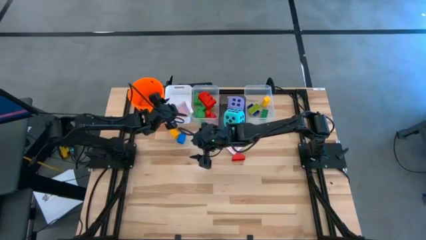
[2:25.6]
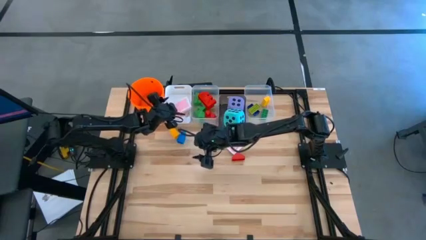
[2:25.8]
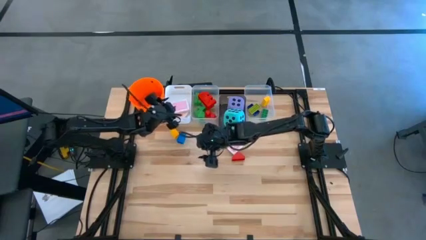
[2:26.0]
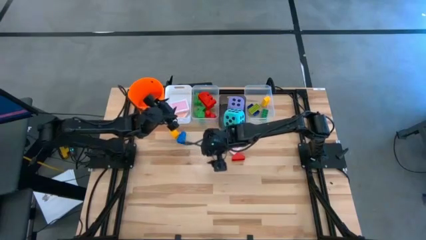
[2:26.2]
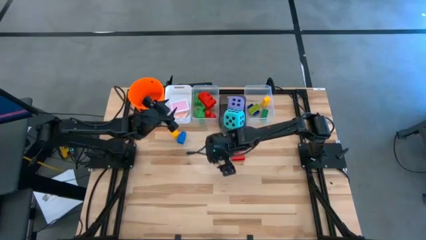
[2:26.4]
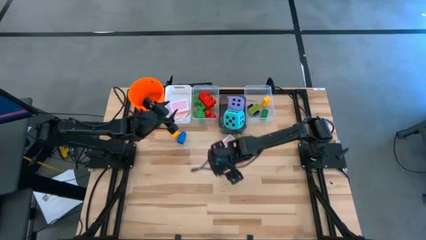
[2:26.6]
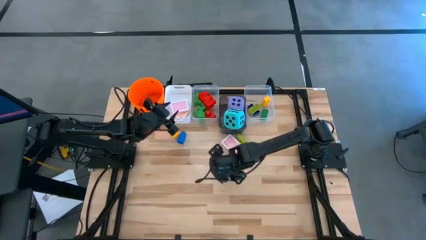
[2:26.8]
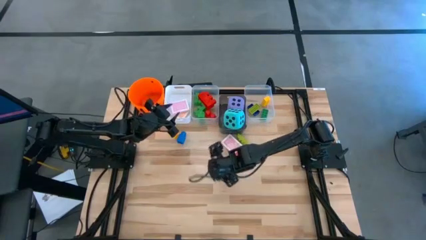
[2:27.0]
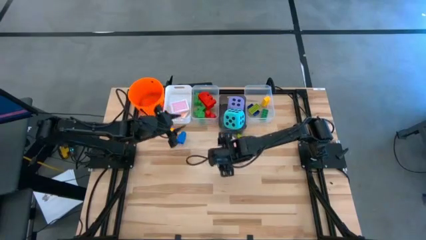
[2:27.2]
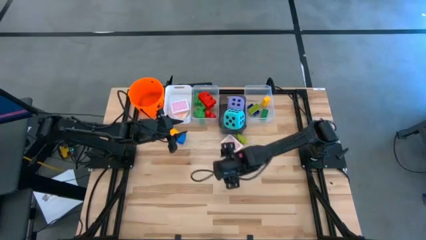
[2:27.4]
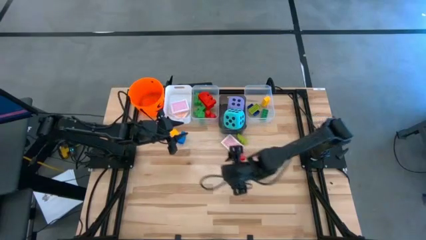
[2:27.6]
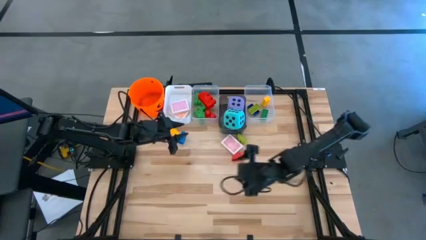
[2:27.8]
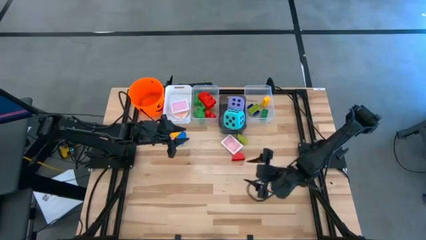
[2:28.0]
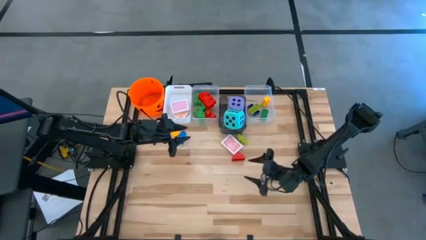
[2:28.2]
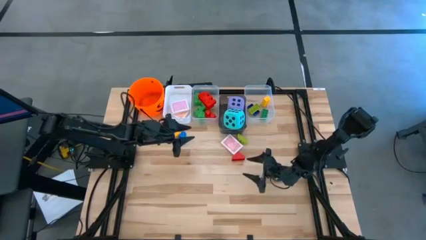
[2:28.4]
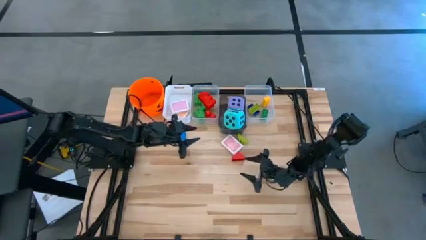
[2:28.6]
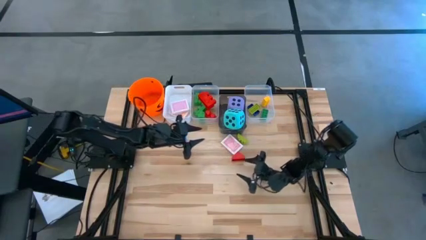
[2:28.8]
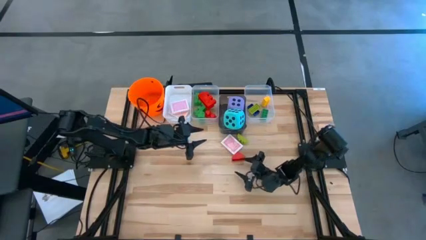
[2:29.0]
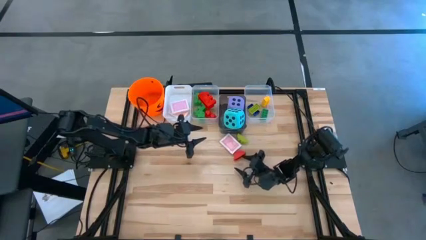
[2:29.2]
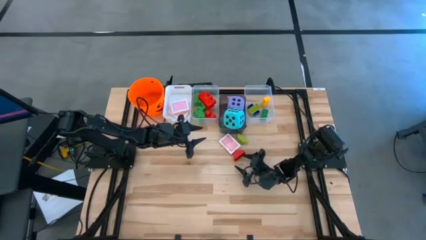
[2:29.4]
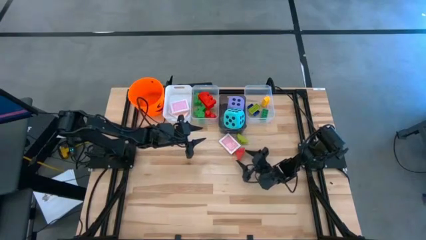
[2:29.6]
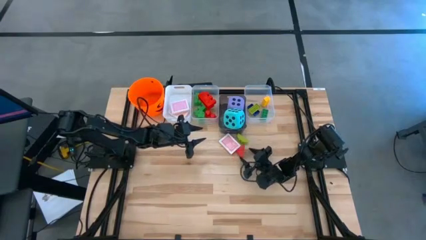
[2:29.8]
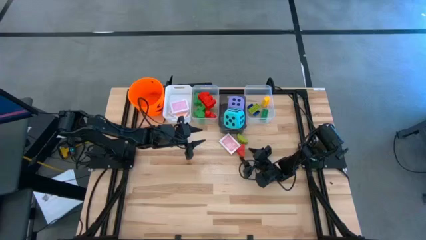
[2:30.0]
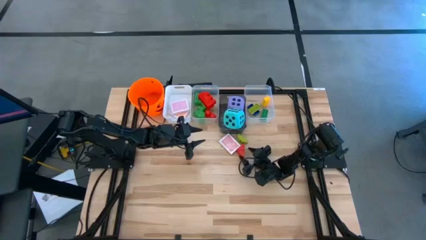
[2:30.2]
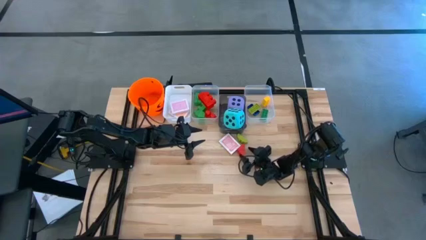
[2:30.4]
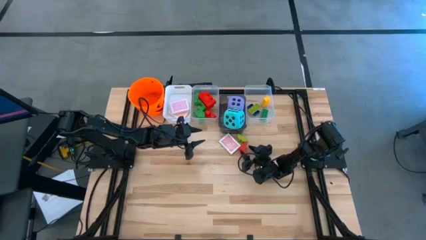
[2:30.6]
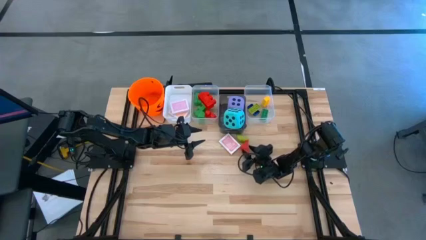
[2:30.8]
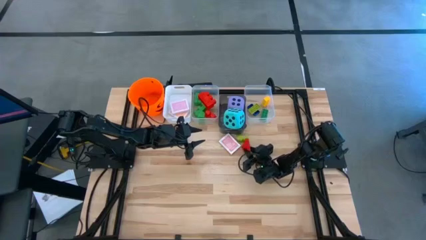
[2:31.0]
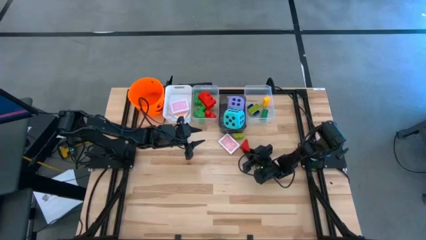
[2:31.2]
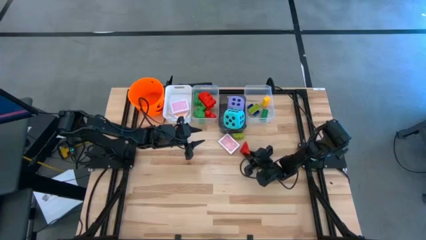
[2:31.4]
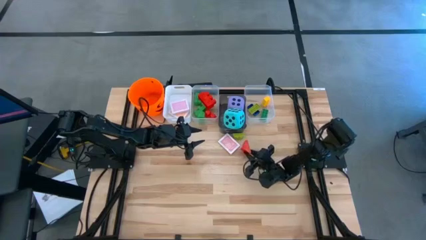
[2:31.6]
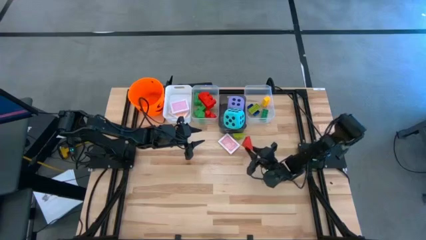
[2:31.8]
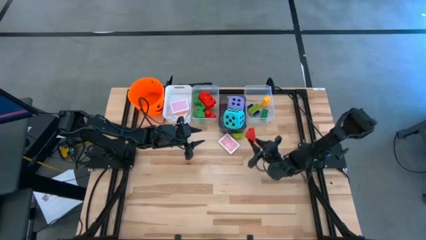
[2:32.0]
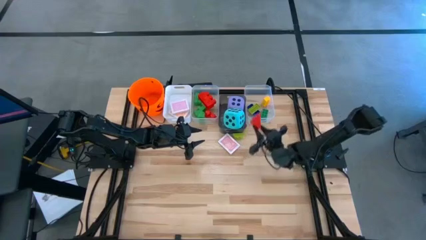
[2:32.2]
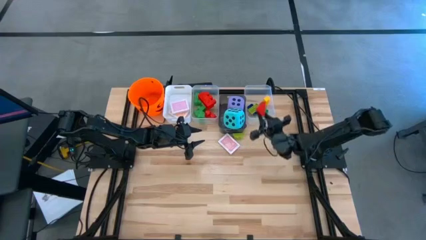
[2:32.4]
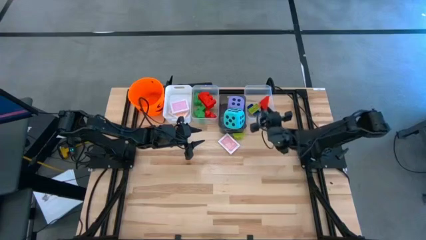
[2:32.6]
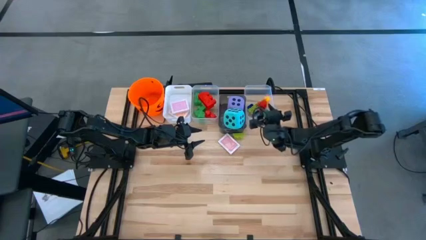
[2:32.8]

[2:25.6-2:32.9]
Task: Pick & Place Toys
Put the small red game piece into the right transparent bin

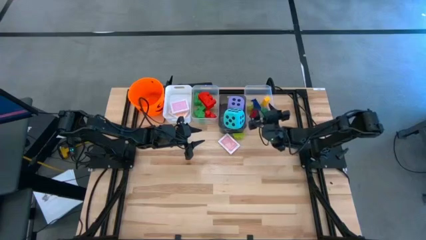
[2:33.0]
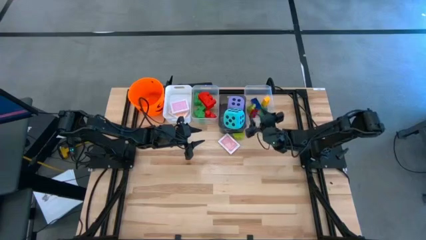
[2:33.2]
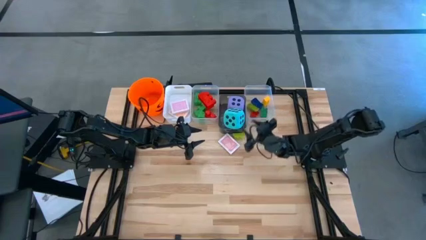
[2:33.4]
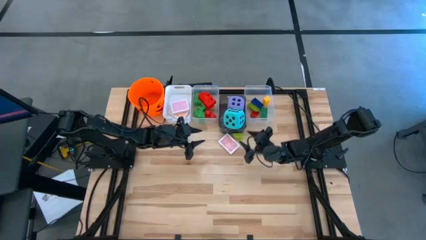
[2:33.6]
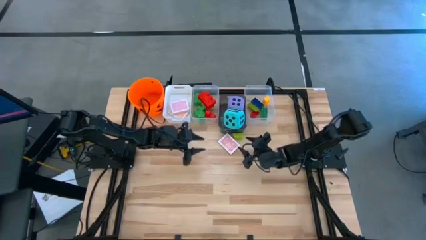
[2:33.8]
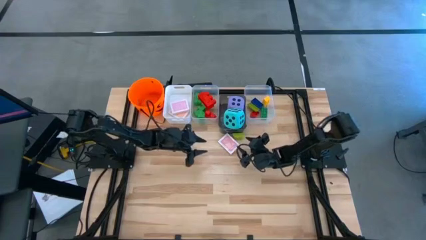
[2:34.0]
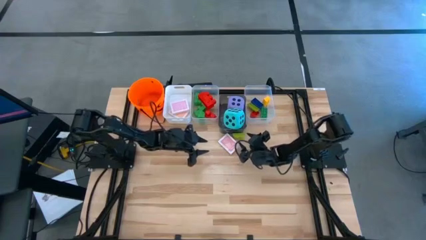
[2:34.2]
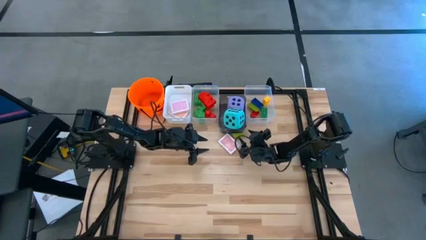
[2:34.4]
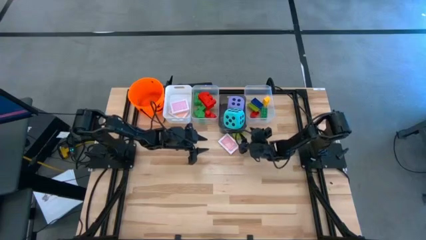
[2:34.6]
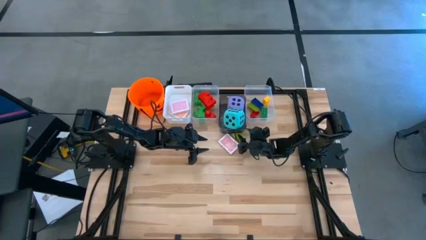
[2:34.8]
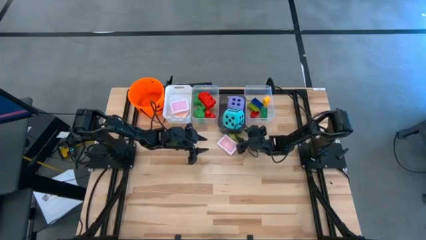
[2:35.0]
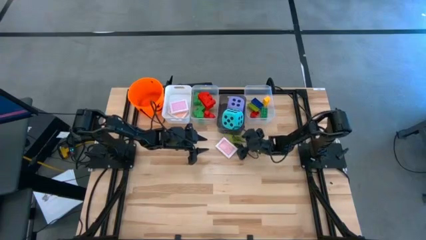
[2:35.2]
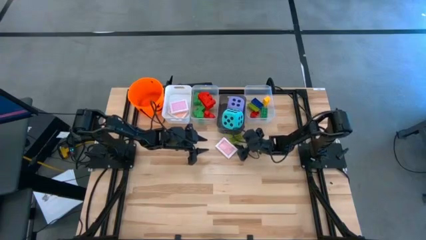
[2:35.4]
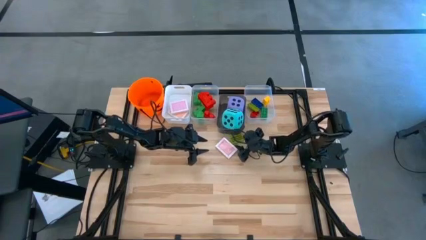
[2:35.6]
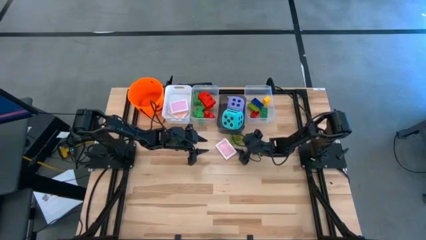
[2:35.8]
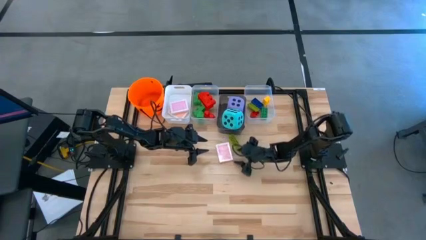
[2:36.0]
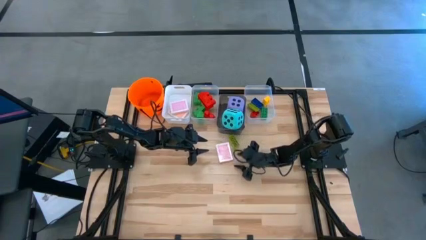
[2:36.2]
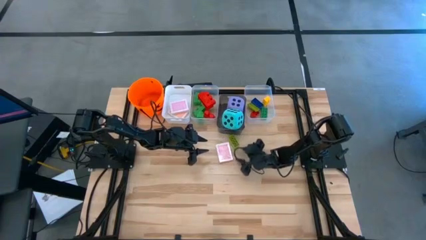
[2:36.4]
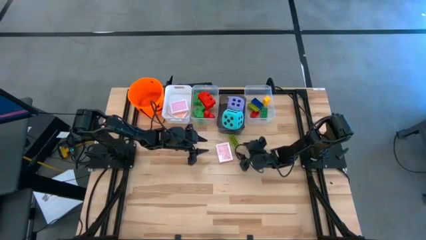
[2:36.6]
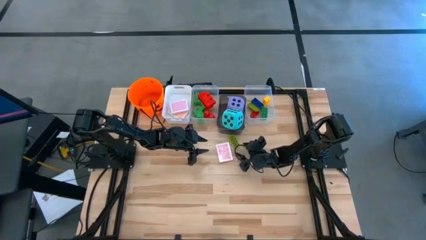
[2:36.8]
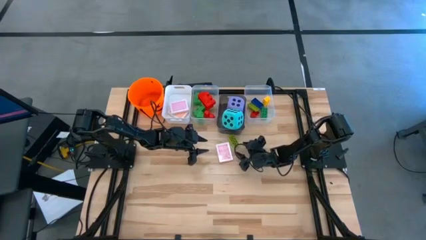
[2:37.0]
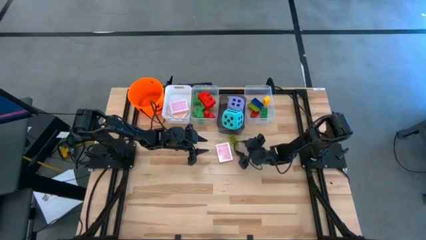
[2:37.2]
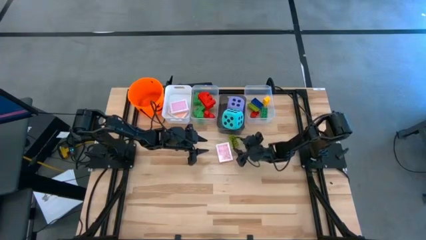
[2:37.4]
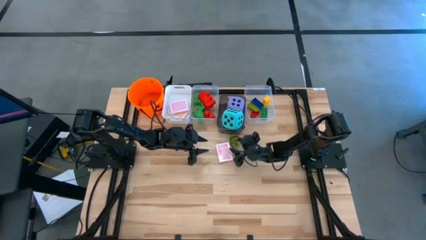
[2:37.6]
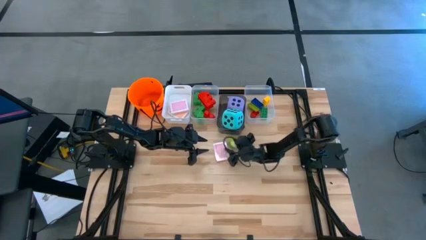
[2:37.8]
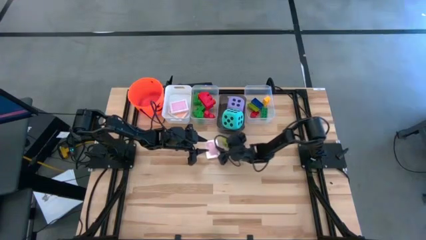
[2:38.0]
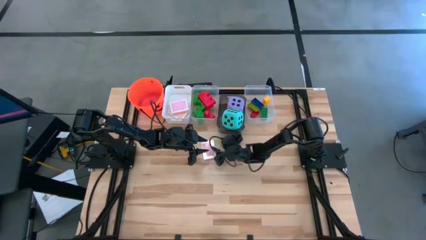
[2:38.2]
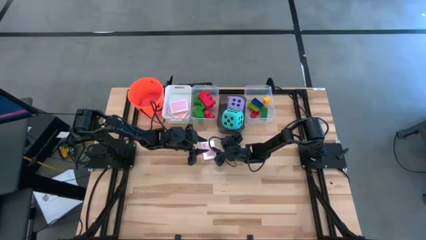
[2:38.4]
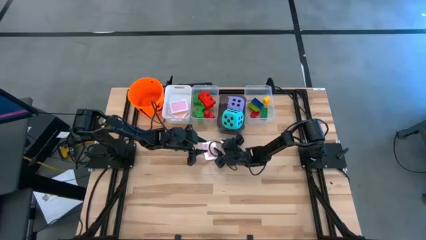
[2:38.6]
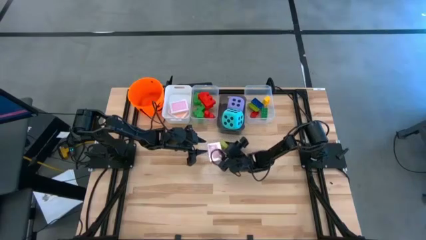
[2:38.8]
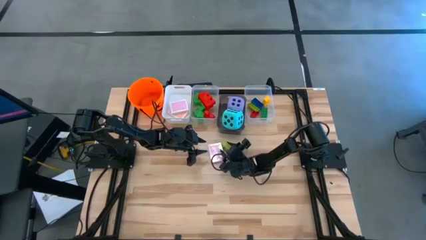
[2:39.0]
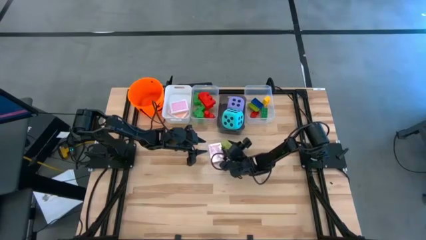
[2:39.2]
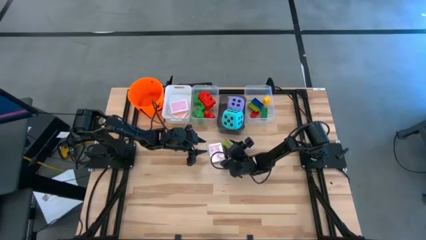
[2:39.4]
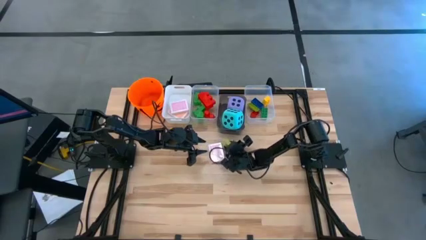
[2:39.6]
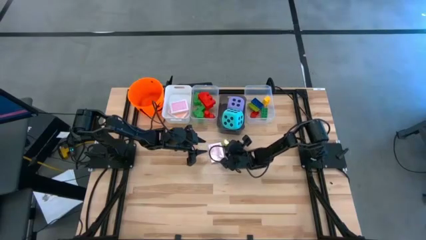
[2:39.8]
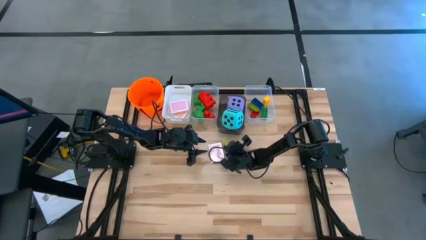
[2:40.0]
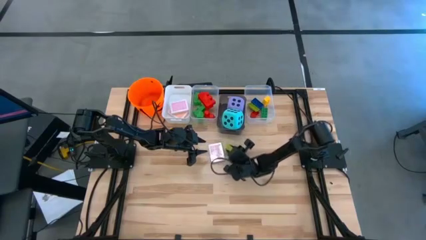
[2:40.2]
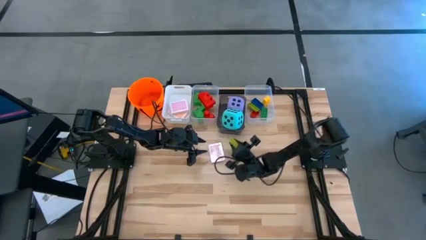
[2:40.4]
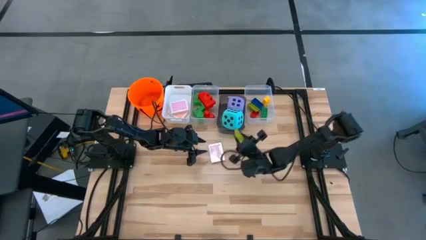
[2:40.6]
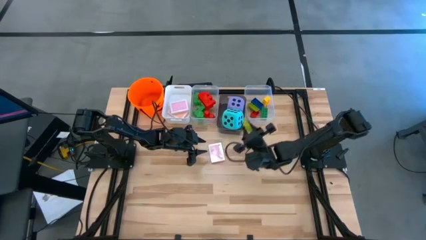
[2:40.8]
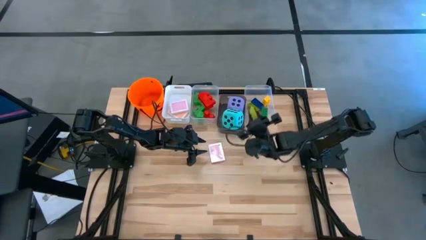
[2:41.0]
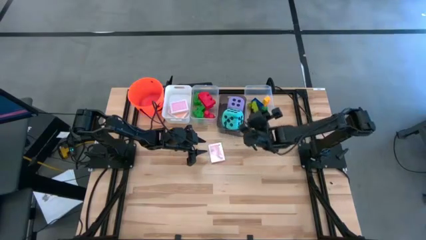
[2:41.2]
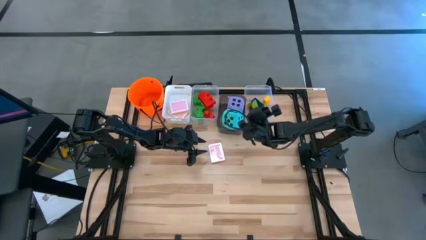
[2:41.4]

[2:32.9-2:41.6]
Put the small light green game piece into the right transparent bin
